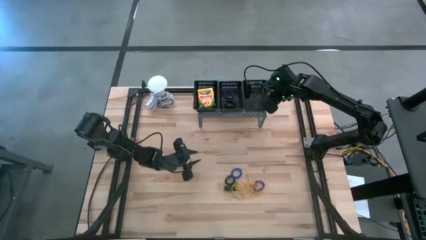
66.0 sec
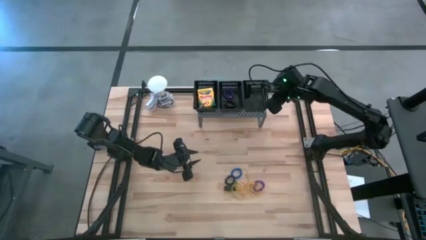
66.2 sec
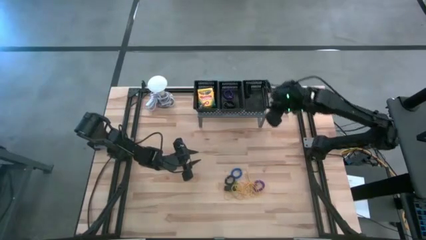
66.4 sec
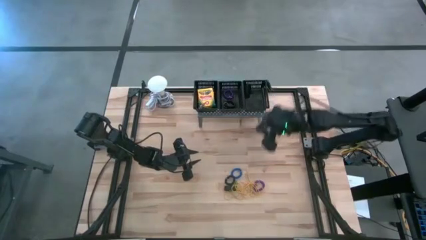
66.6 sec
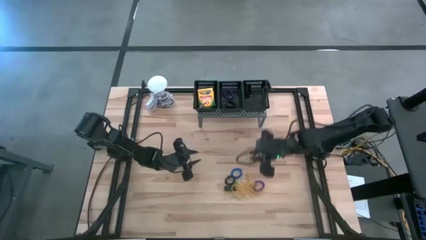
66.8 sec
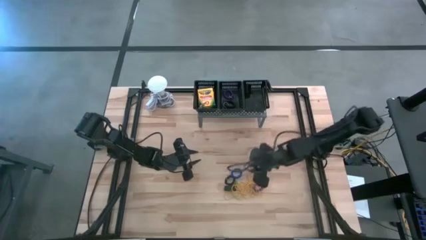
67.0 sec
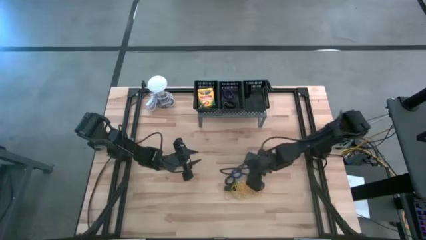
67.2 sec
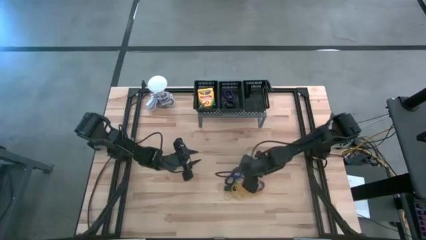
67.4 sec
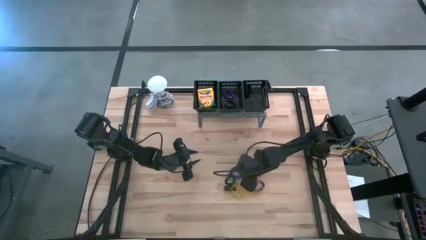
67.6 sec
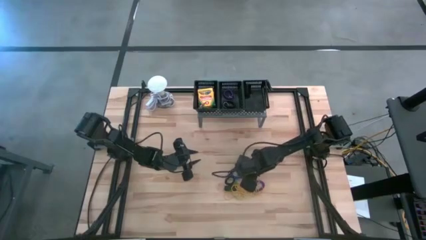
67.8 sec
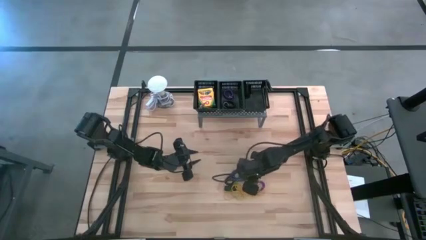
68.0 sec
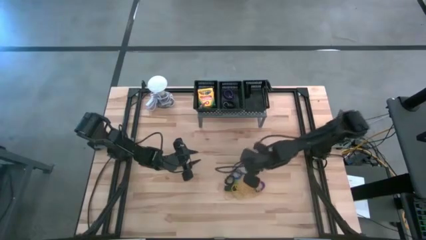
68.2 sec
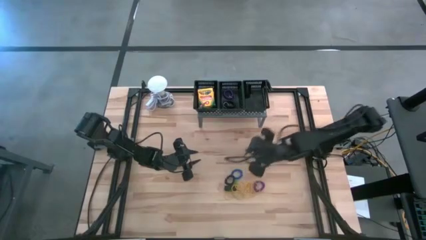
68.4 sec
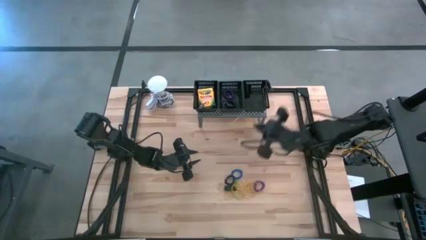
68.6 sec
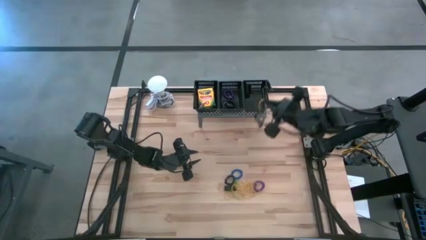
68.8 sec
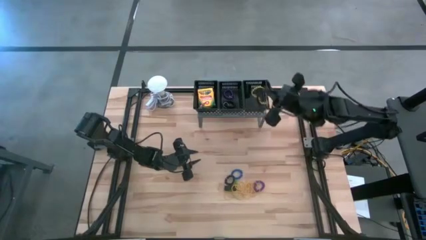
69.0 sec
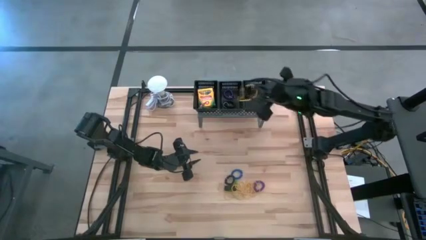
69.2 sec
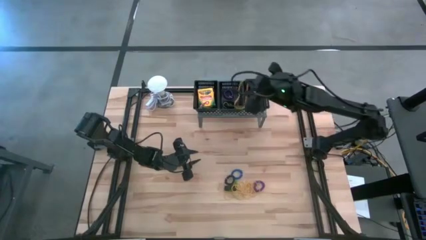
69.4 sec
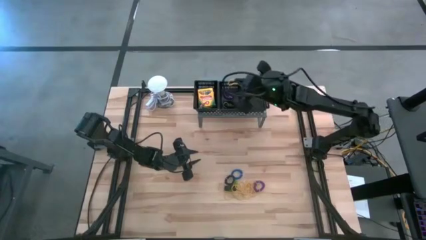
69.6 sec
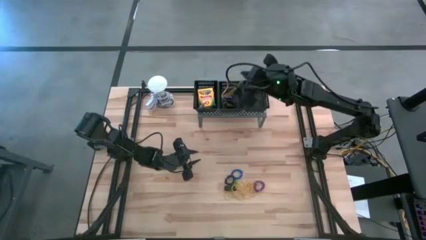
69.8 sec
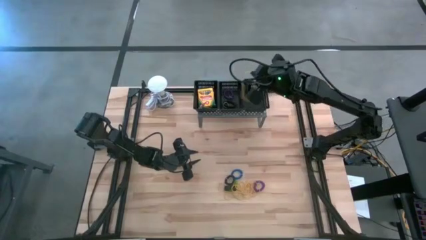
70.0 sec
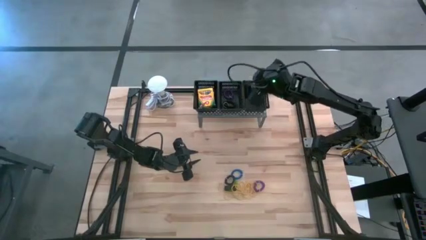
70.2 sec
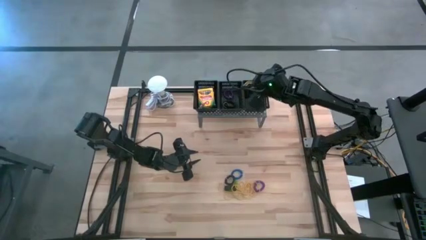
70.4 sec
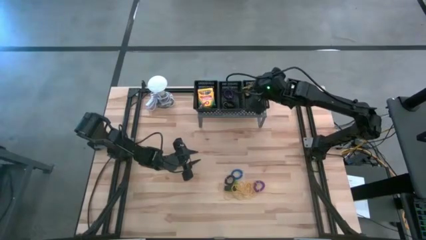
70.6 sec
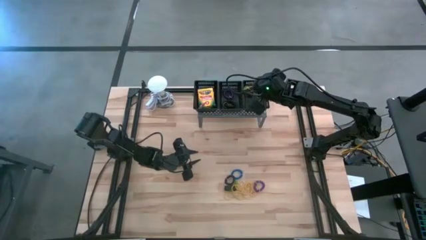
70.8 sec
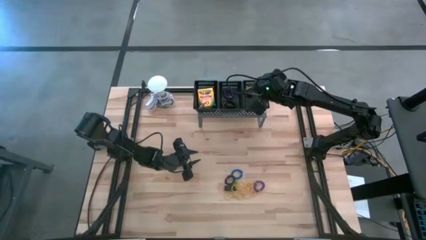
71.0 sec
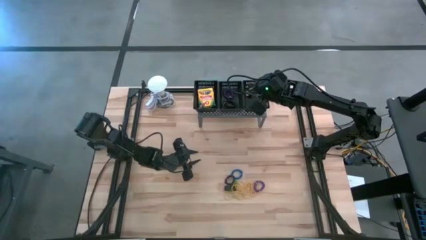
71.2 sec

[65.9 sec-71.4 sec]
Task: Pick & Place Office Desk Supplies
Put the yellow rubber band into the right black bin on the shelf

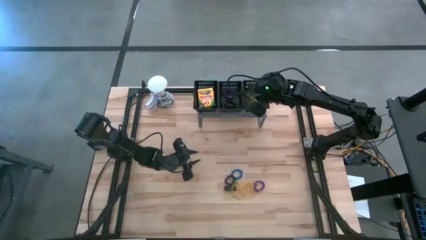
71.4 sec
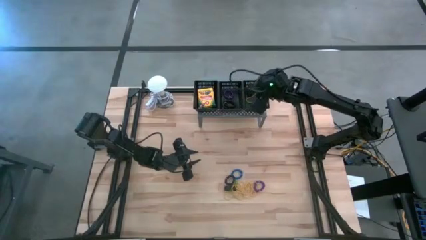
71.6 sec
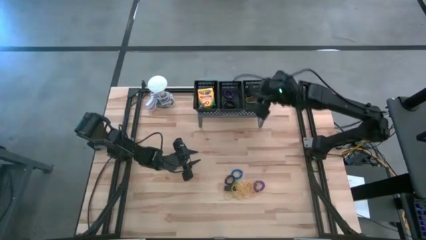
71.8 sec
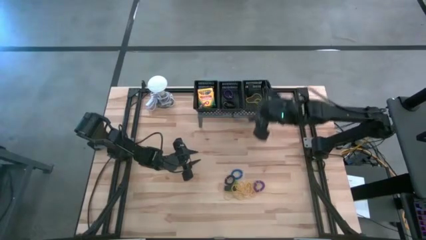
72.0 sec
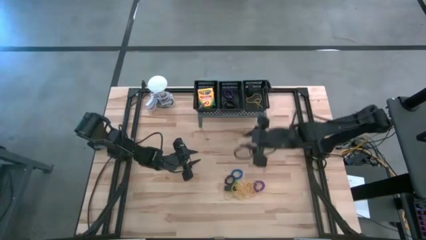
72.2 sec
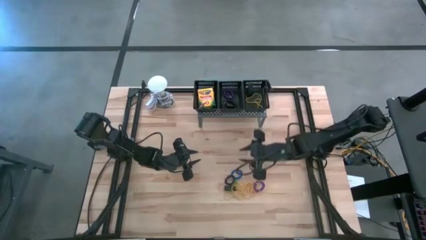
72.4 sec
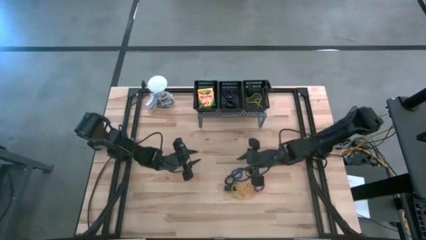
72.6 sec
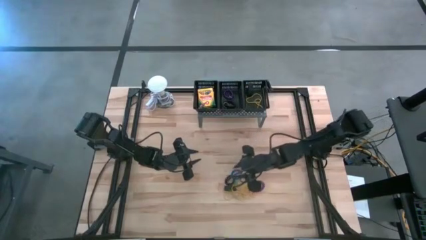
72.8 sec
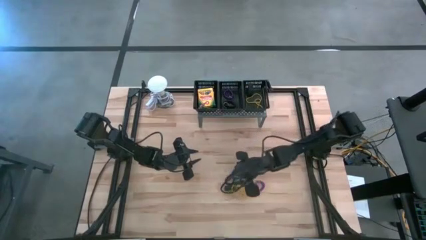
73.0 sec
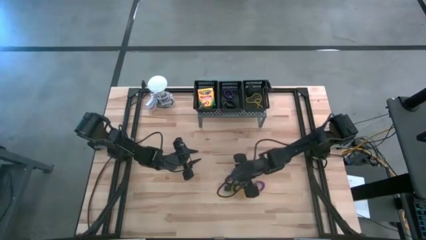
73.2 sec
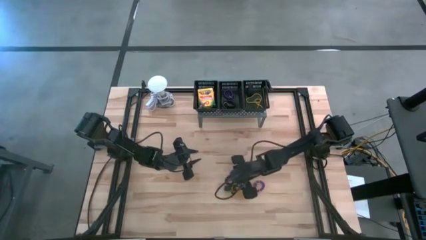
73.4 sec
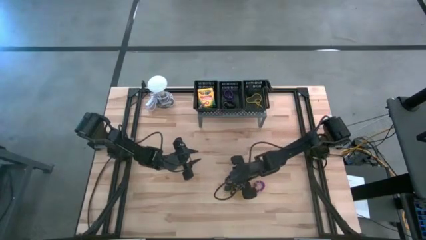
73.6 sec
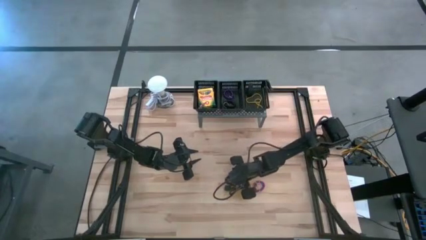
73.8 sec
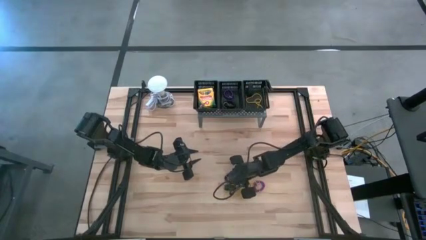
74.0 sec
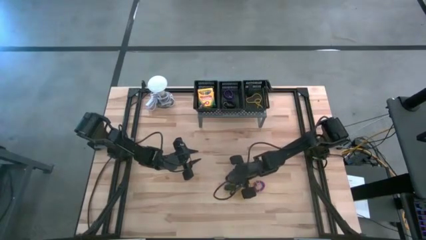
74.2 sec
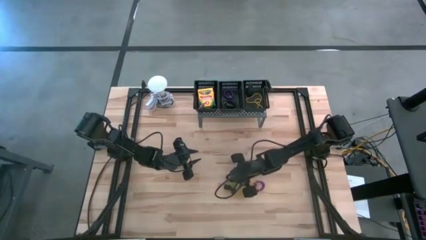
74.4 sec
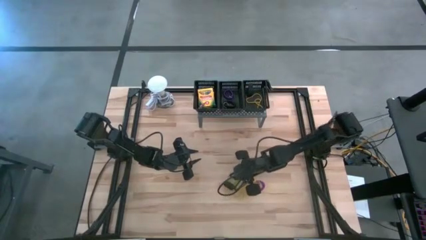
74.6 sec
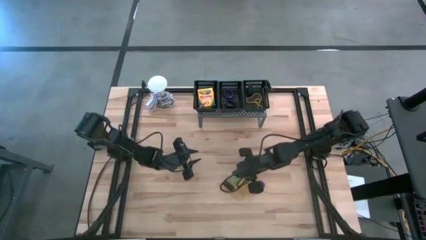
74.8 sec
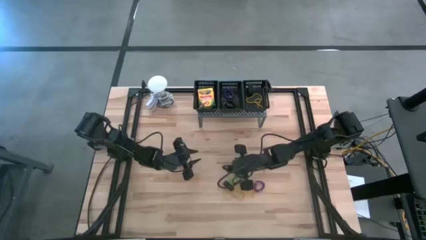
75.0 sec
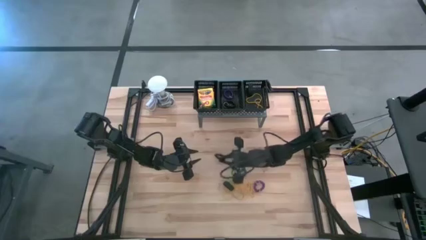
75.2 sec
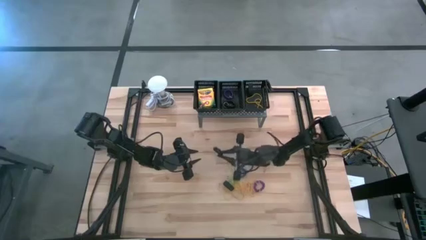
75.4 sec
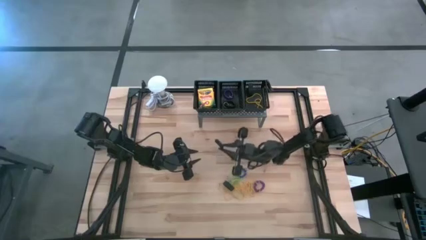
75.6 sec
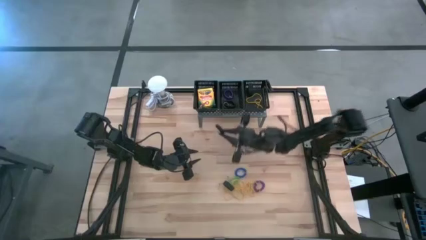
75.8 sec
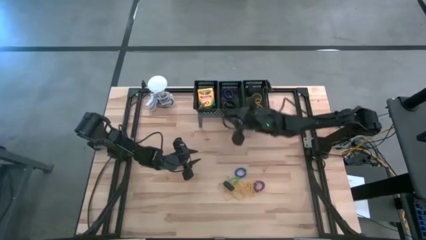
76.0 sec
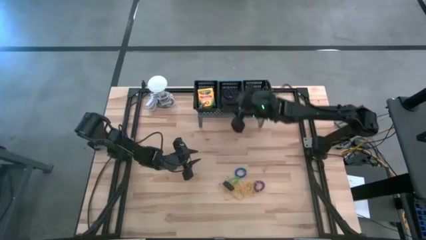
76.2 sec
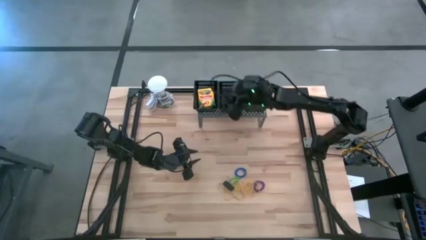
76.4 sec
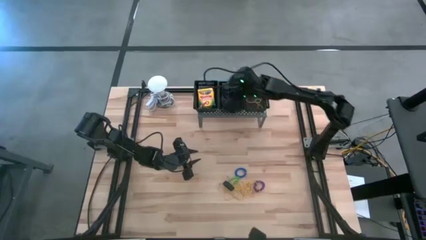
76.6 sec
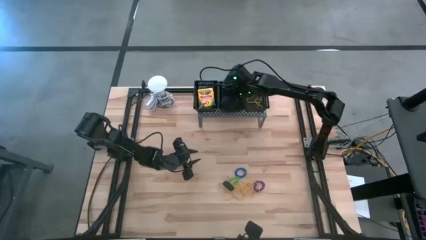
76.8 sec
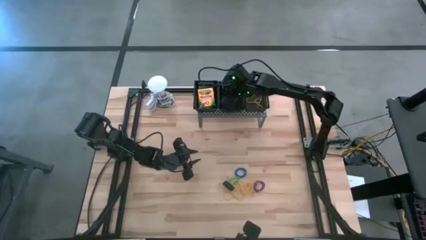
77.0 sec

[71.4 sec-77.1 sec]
Put the black spring keychain into the middle black bin on the shelf

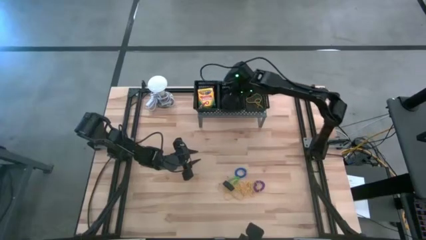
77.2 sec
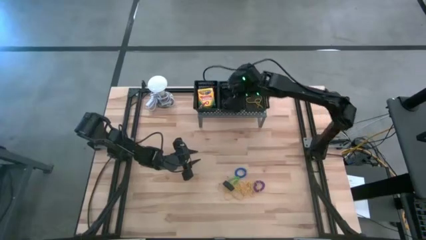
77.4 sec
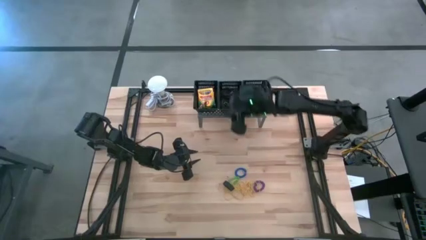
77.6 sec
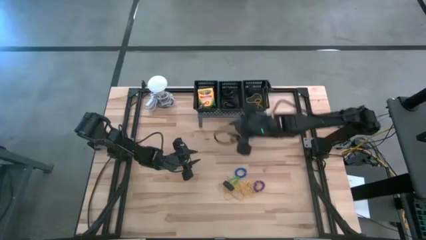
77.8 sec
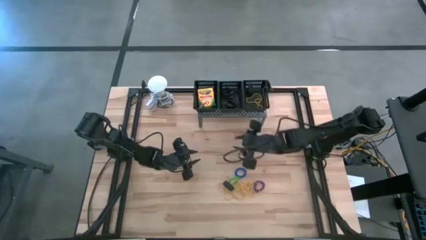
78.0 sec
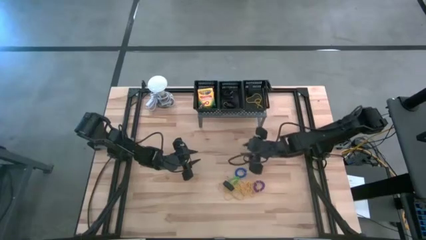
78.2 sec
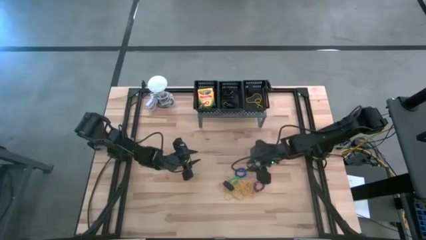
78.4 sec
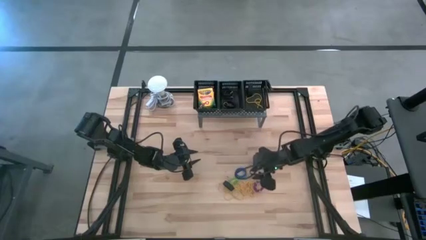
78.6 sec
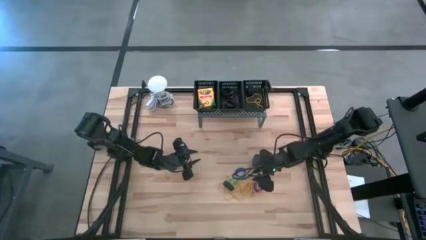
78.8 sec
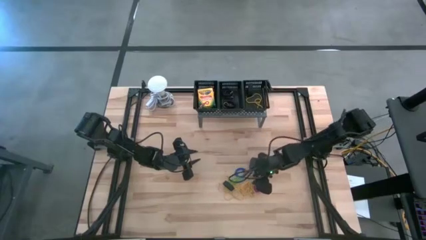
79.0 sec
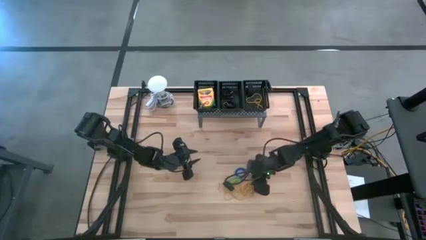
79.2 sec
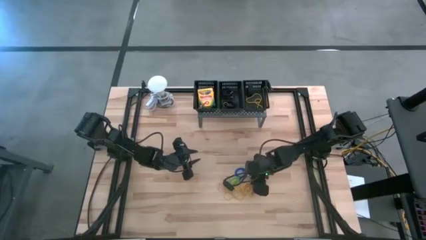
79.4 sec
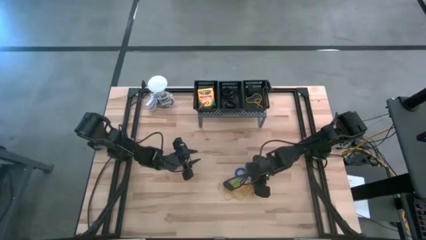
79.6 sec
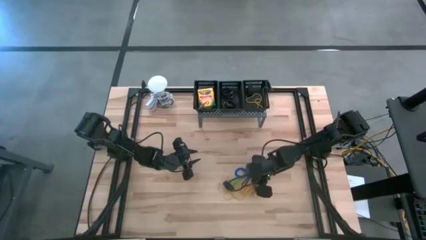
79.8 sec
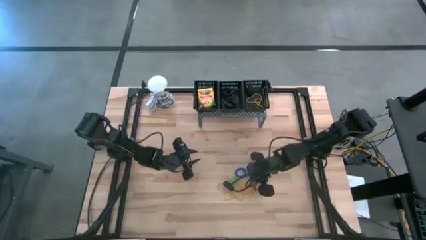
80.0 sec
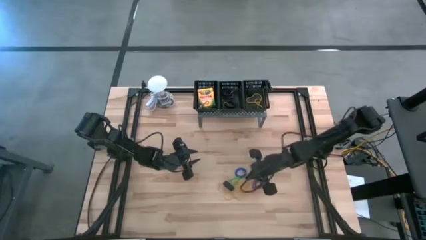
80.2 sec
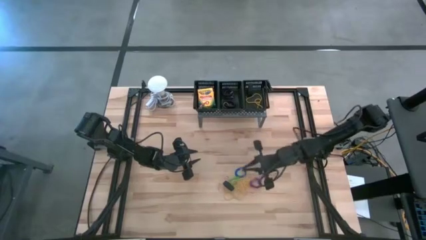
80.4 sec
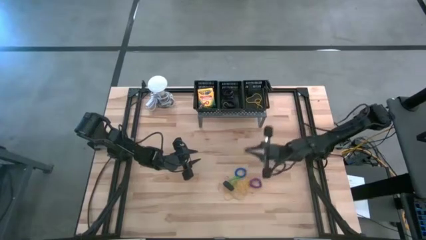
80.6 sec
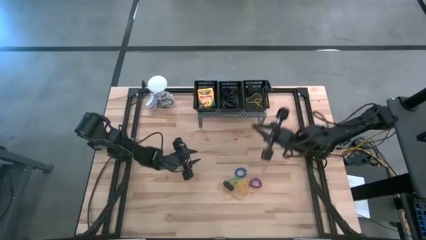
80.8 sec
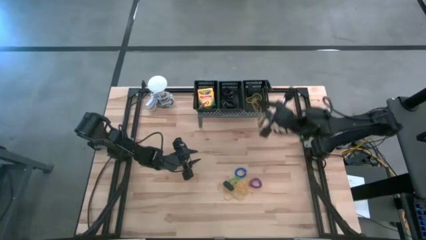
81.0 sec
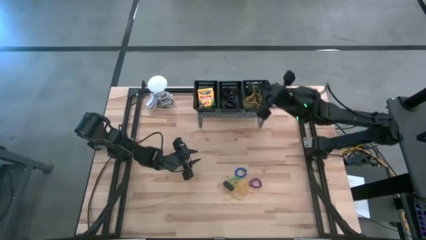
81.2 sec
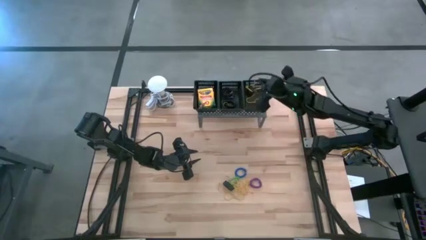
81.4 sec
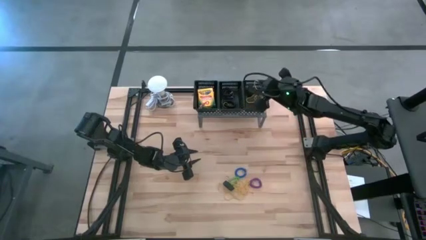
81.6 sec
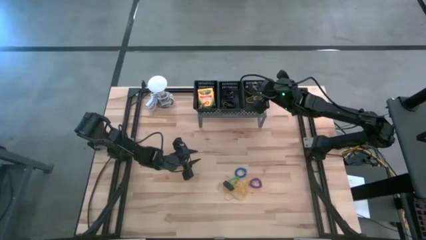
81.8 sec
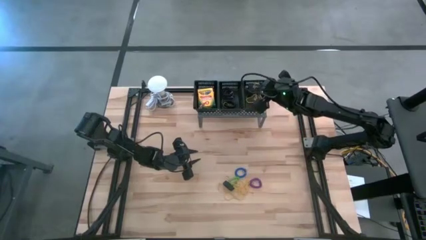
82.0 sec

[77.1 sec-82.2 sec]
Put the yellow rubber band into the right black bin on the shelf
